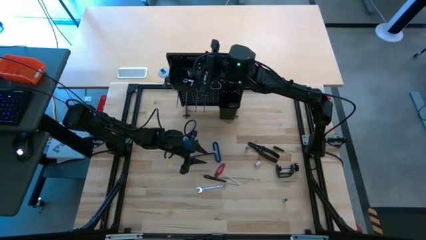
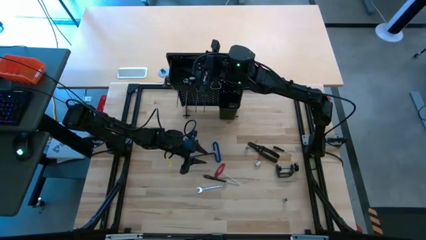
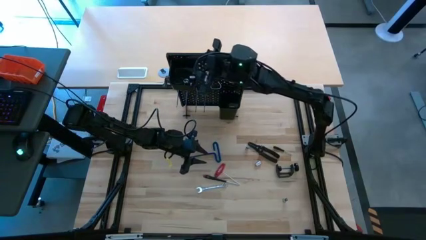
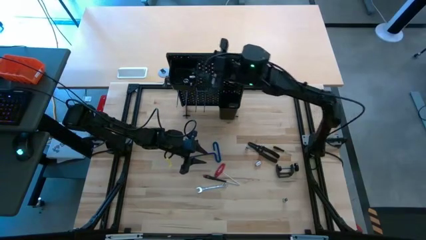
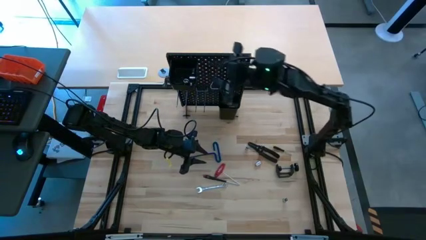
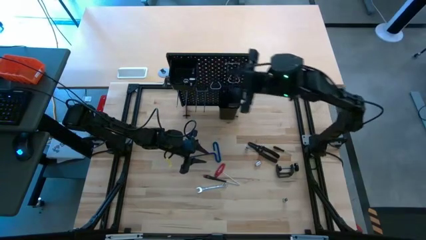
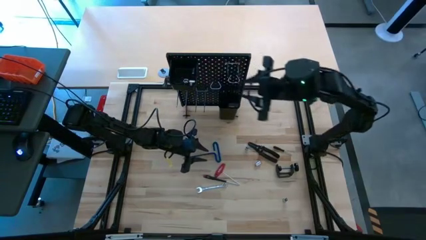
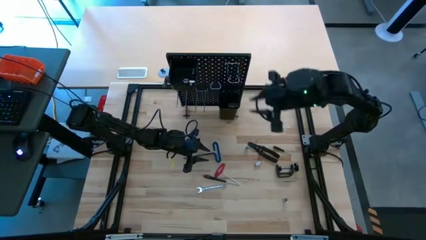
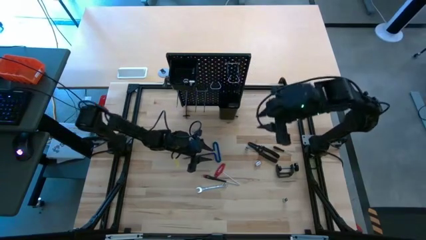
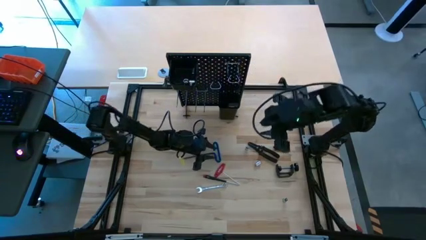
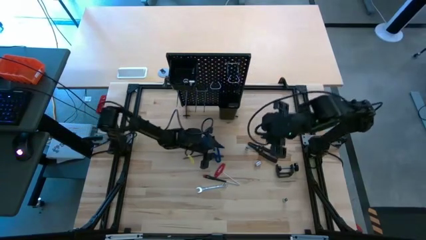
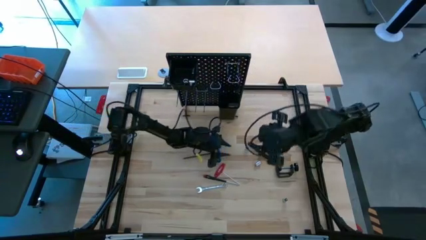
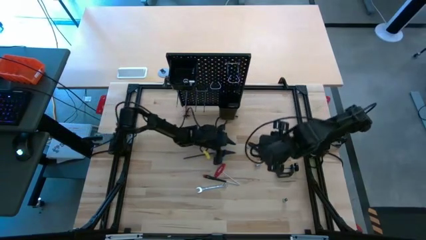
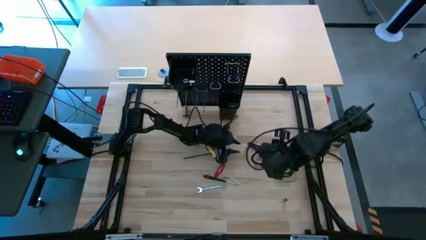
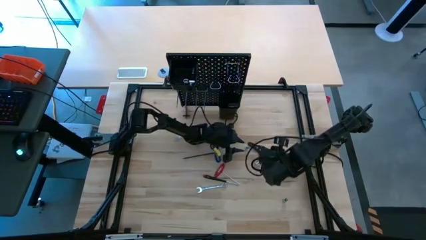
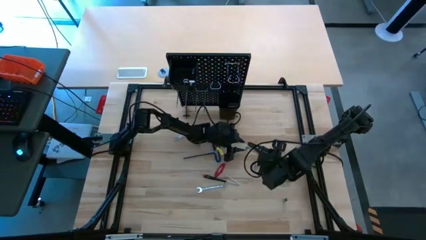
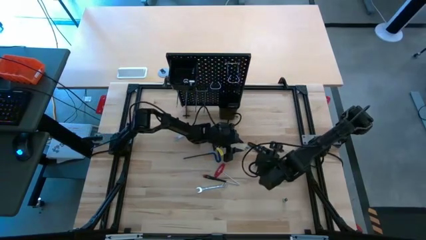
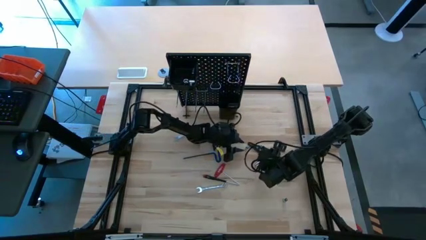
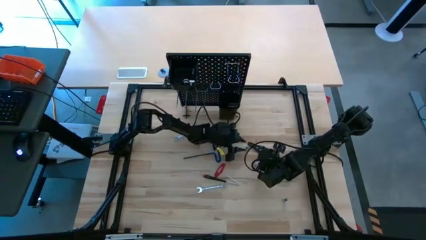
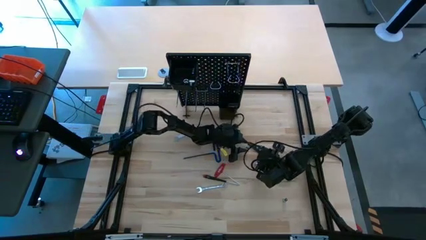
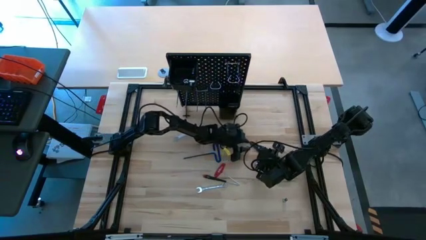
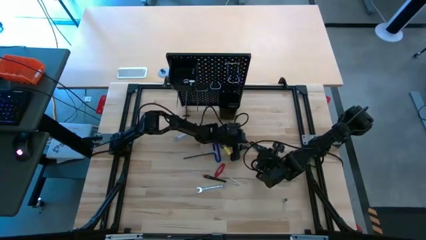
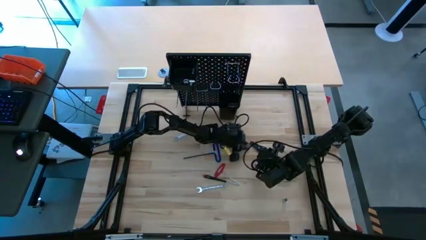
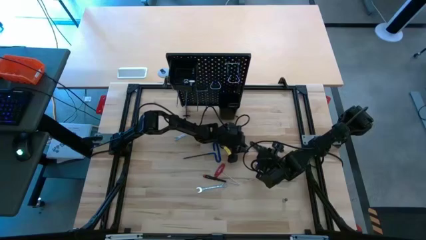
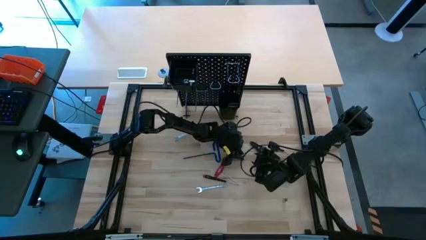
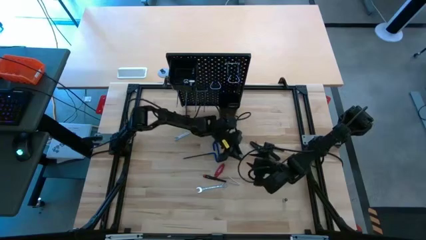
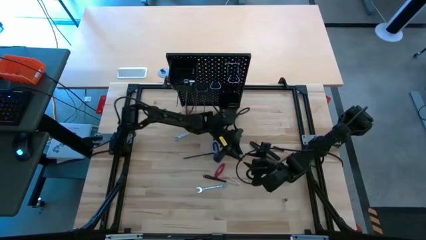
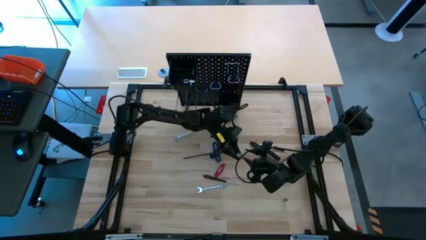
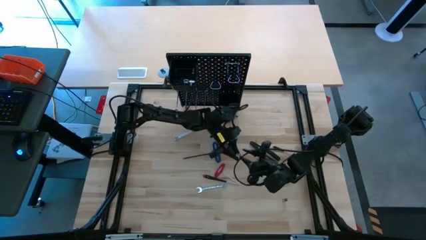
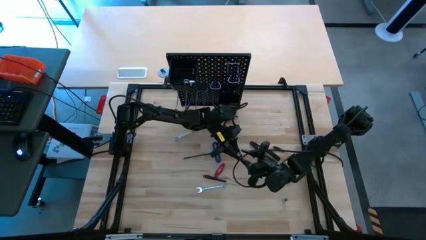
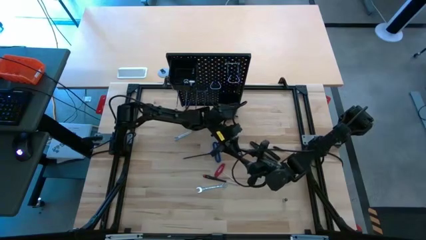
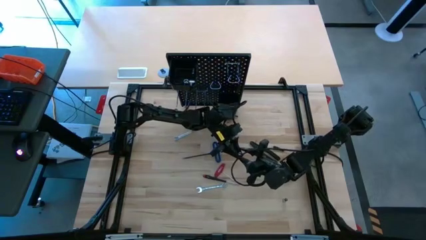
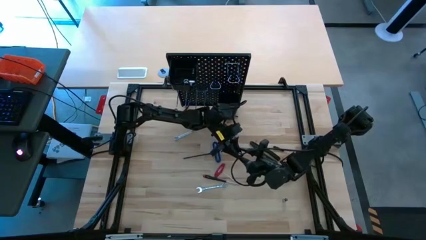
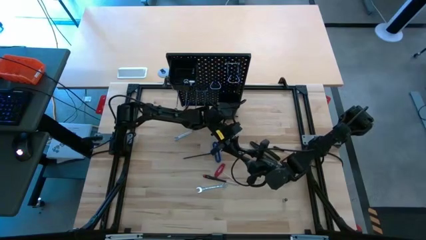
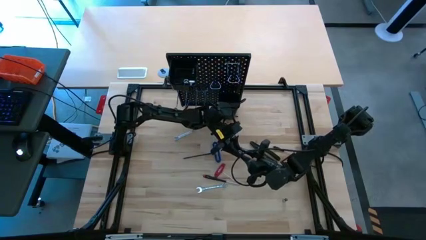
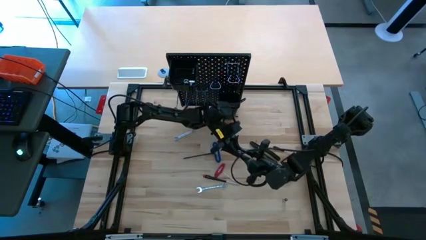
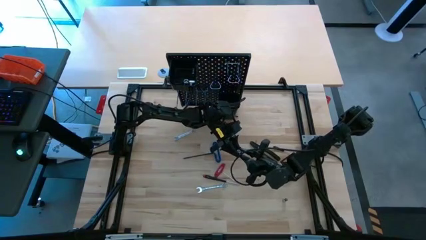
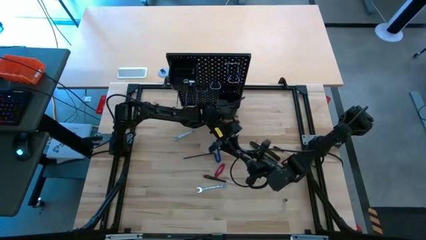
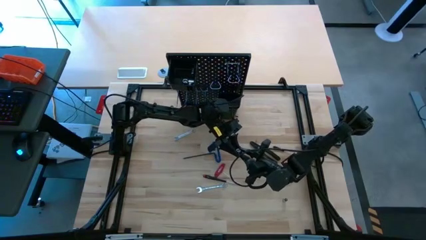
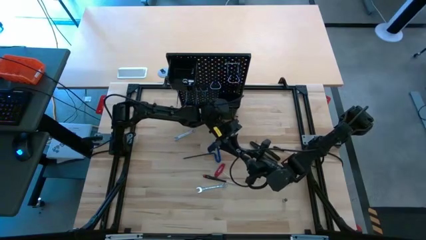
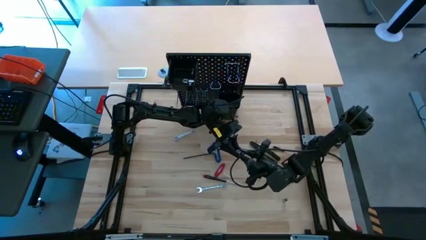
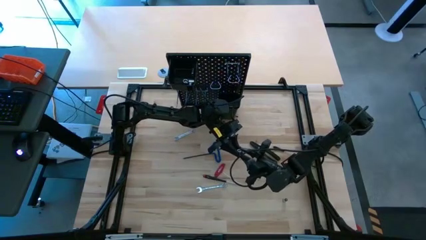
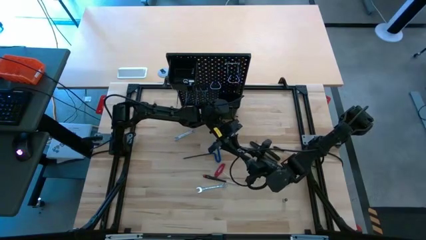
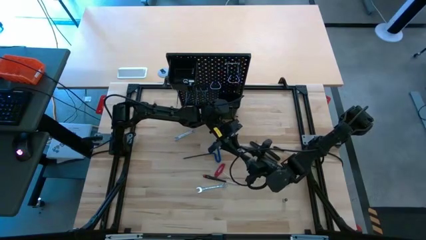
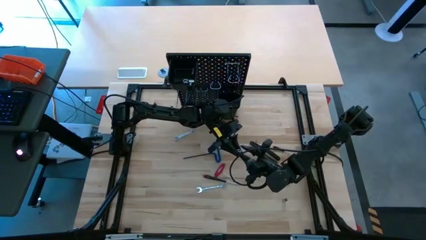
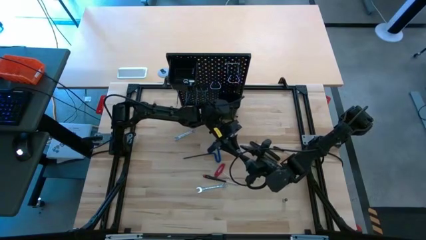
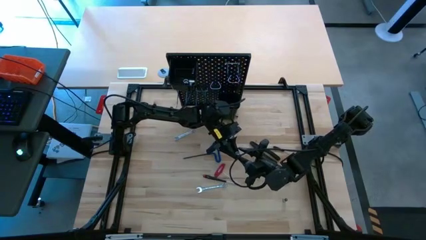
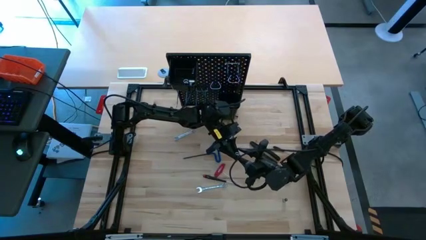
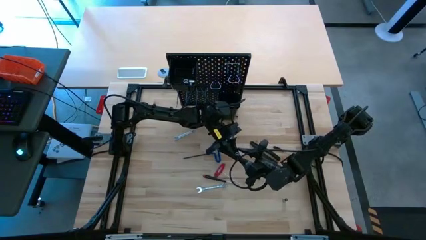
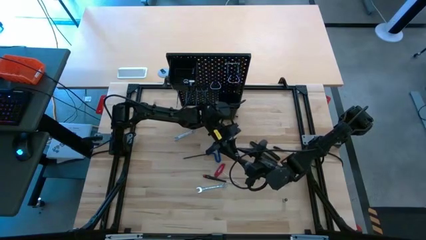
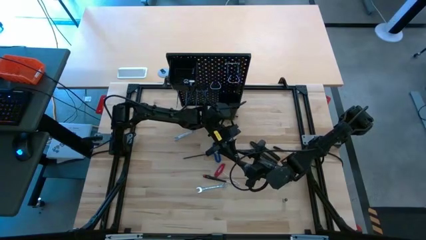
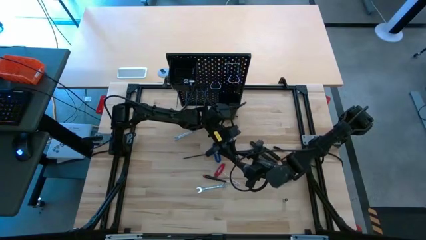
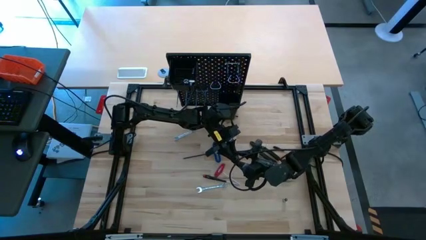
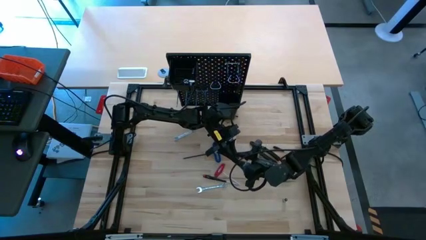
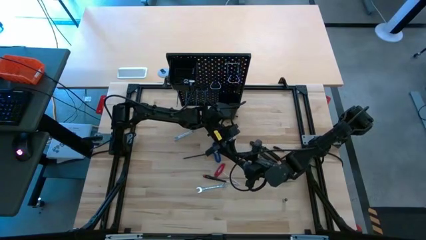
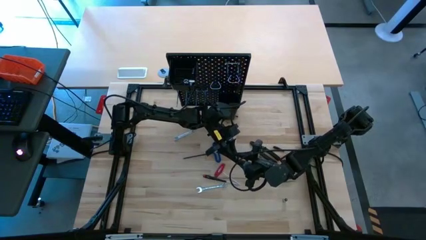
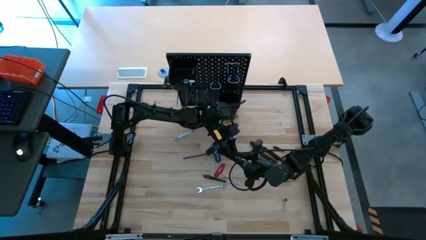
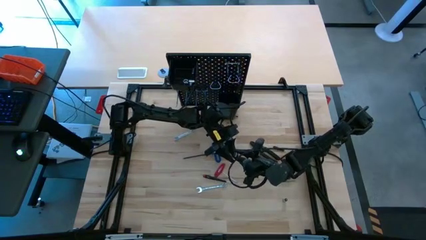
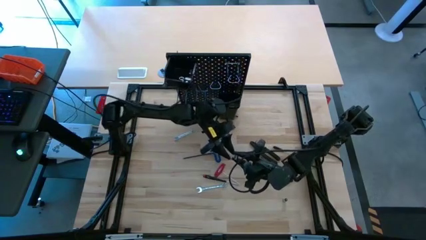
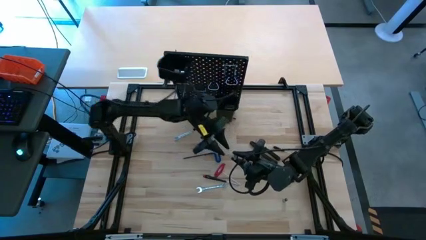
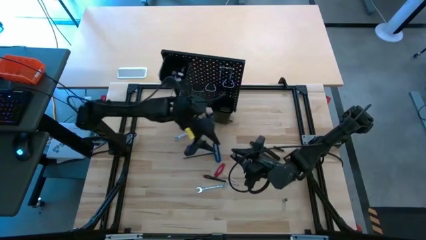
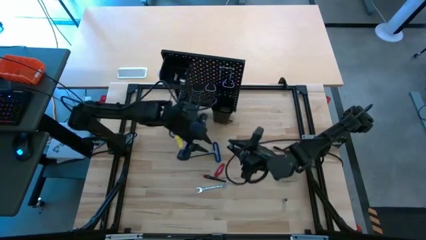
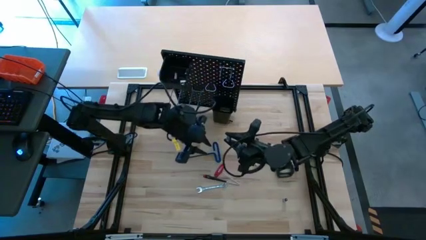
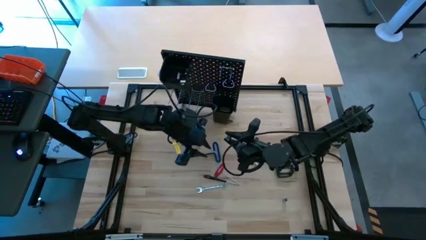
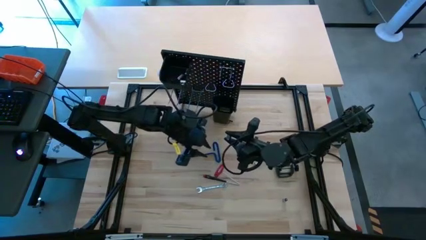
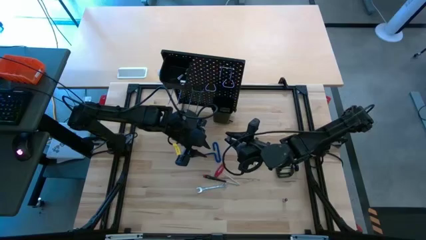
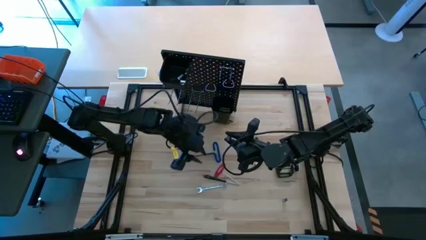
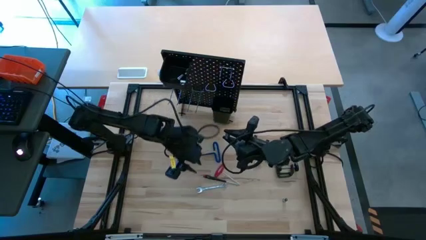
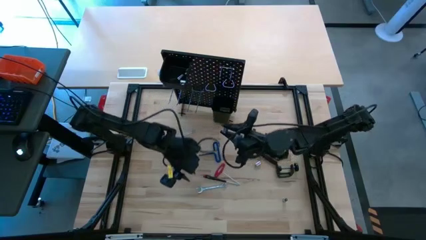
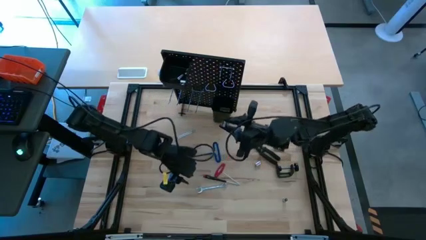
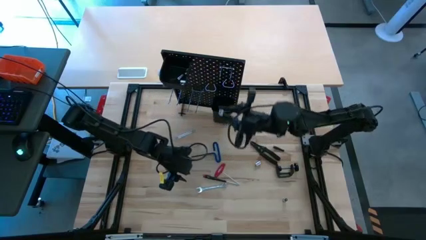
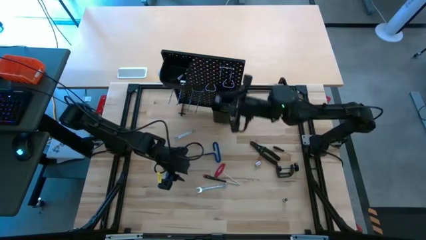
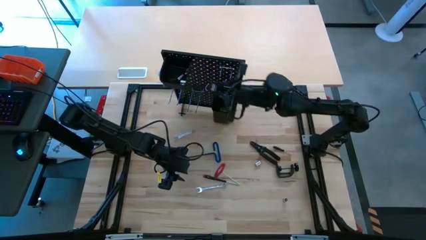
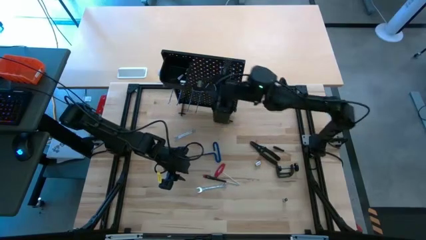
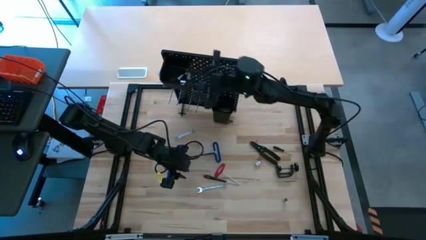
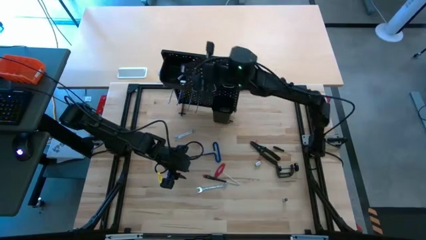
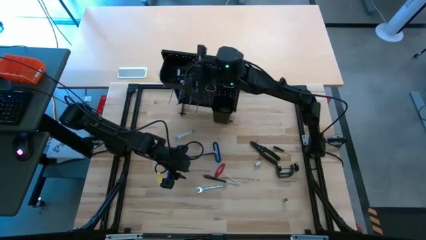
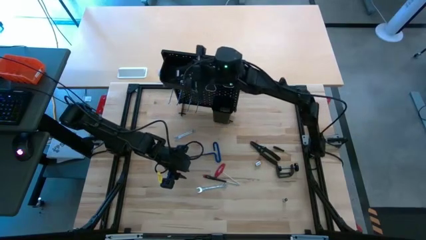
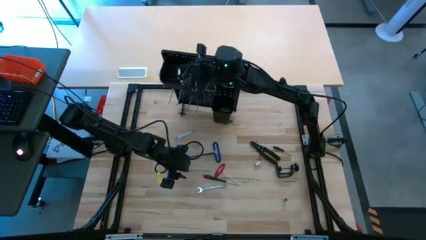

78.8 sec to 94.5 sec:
Task: Hang tools onto peg board
Put the socket into the top black bin on the pegboard
